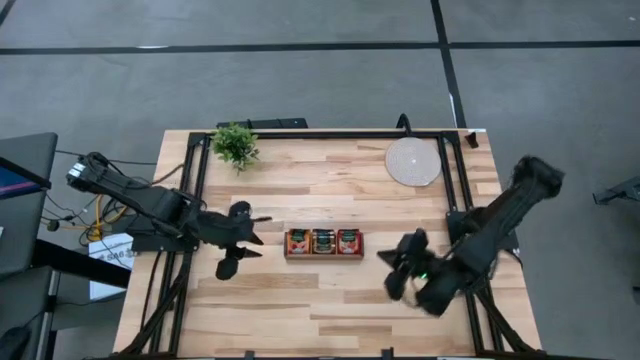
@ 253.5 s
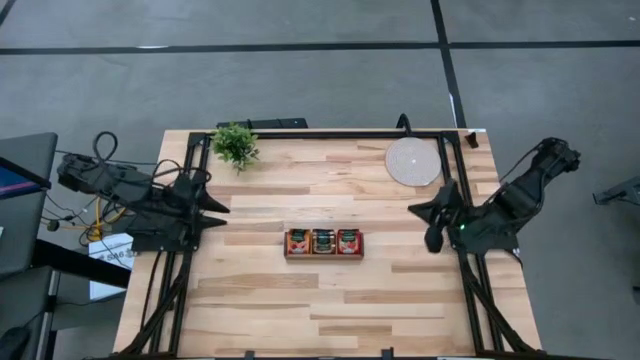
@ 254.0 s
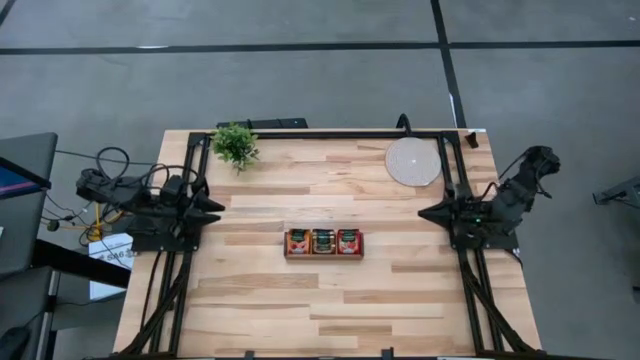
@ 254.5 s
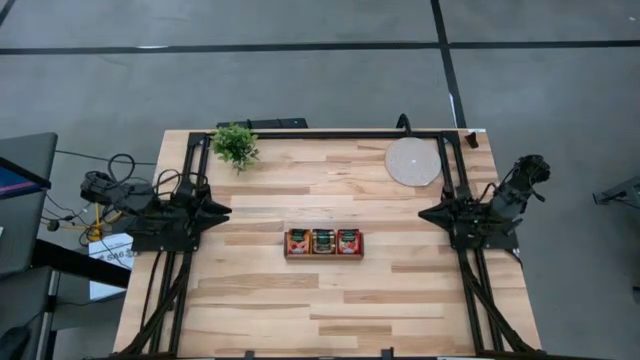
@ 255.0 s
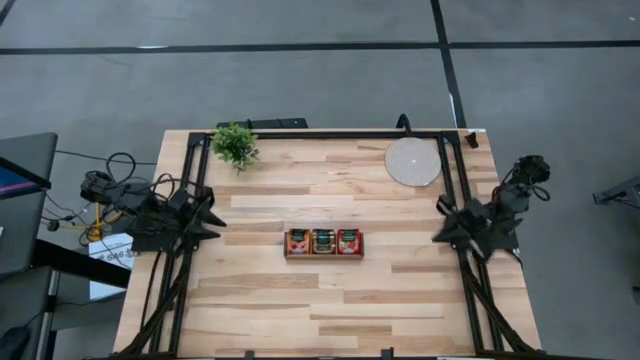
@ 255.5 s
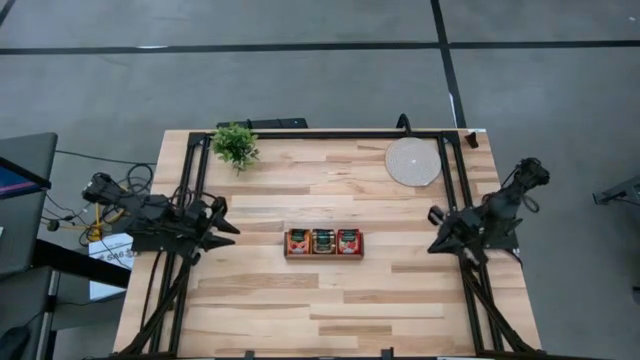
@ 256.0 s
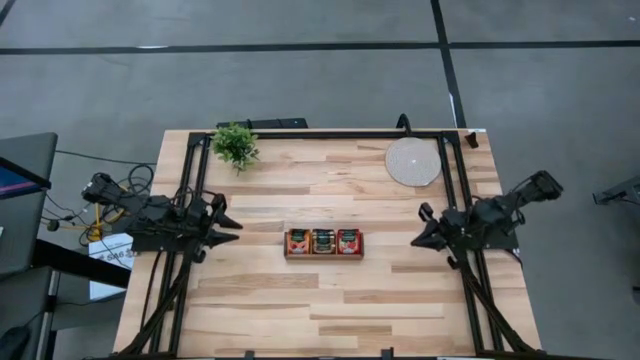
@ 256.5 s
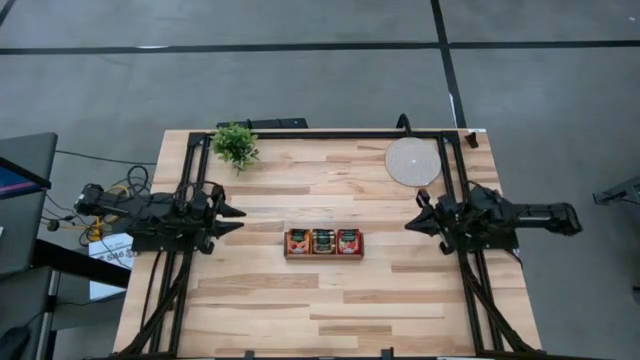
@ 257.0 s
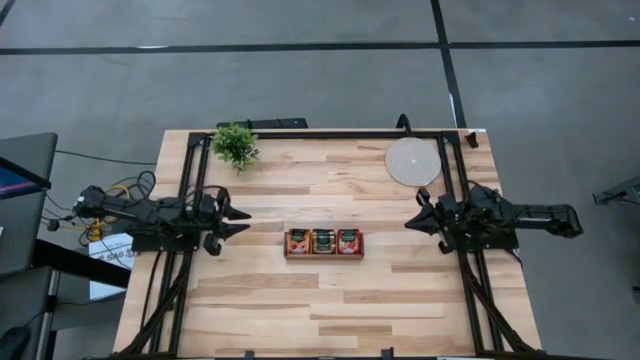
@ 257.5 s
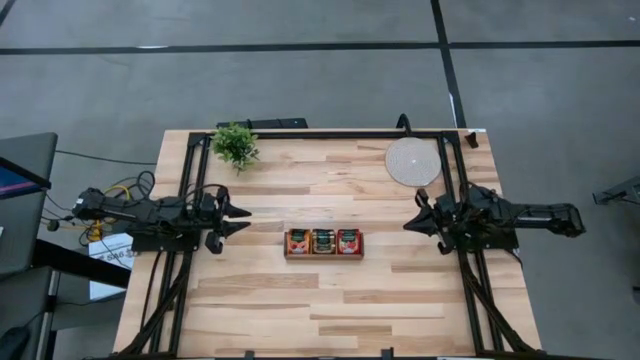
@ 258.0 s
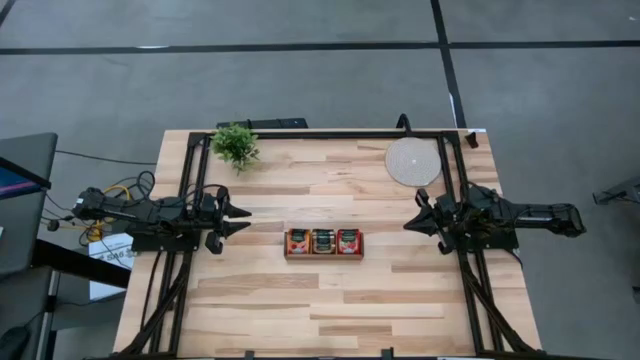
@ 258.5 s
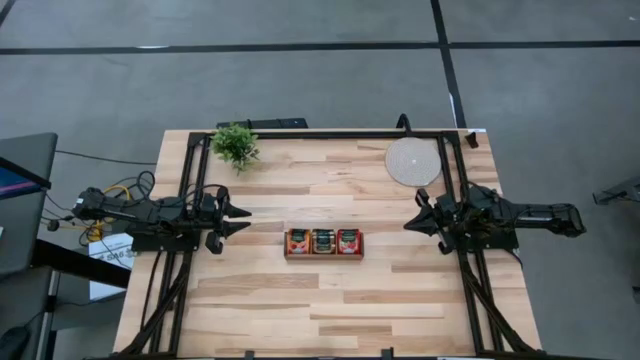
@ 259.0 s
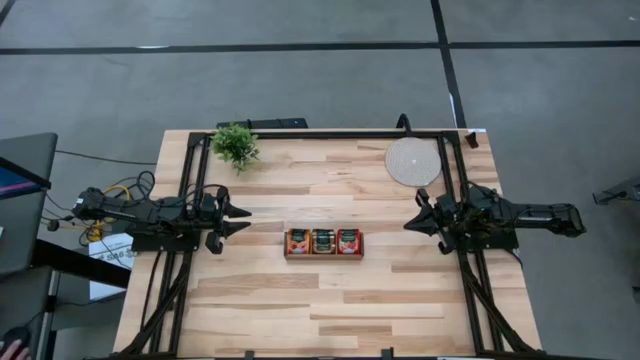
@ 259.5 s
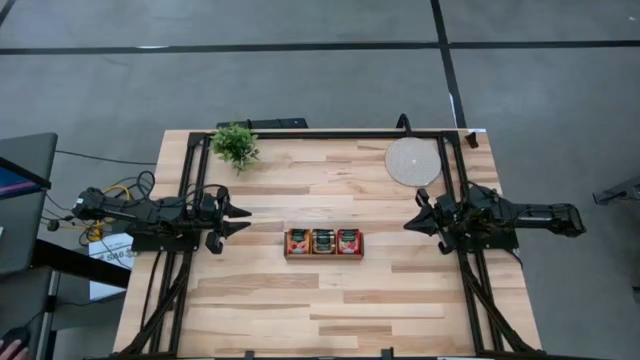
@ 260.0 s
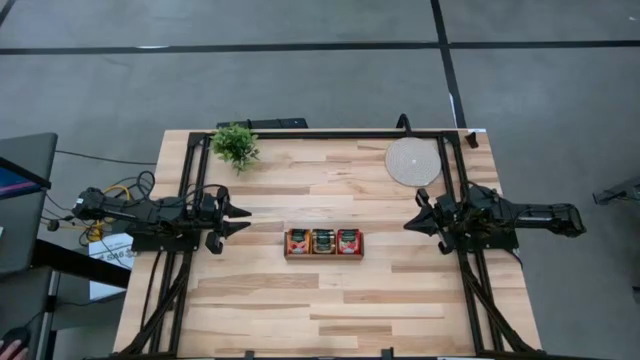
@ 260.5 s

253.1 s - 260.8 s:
Task: Pick & Place Tea
Return to Home Position

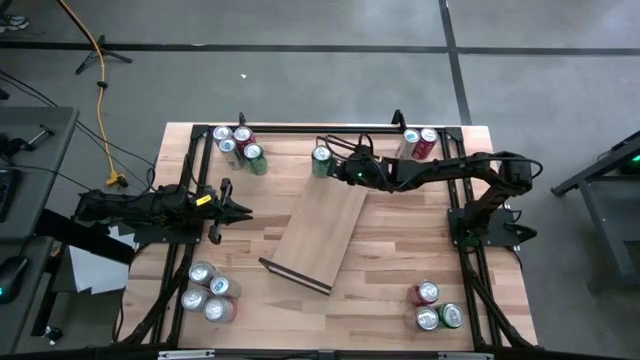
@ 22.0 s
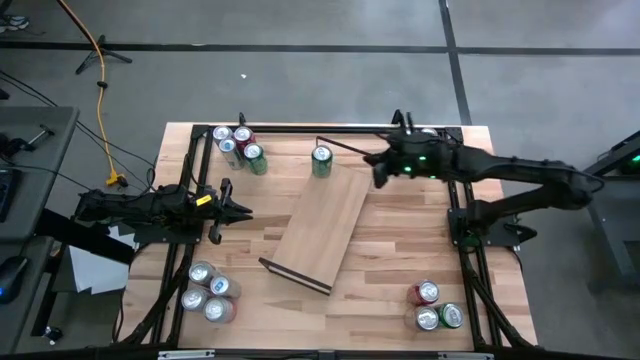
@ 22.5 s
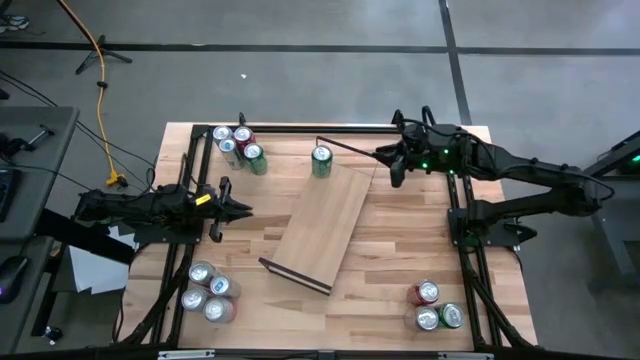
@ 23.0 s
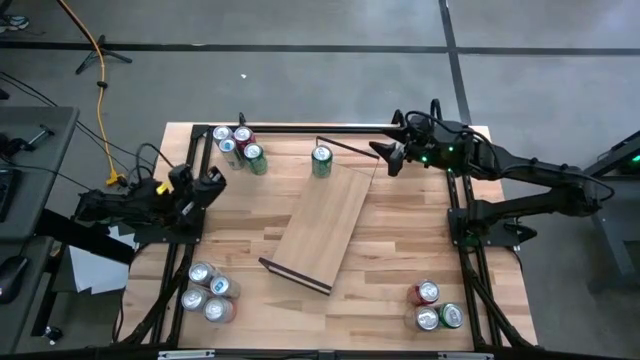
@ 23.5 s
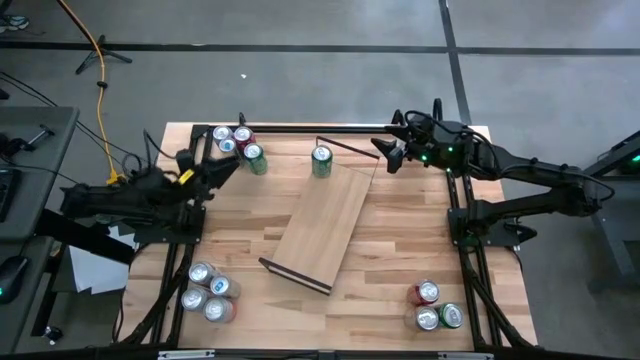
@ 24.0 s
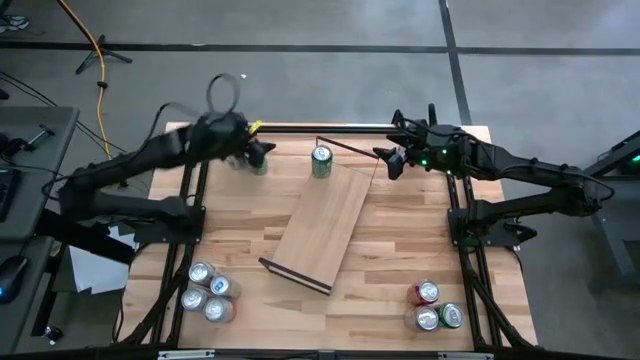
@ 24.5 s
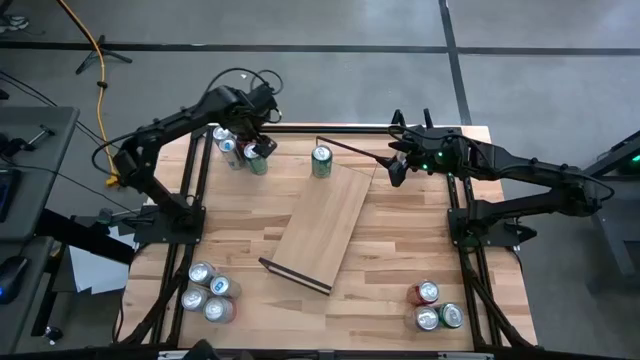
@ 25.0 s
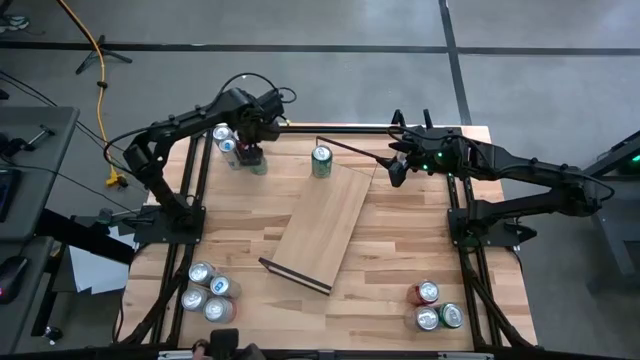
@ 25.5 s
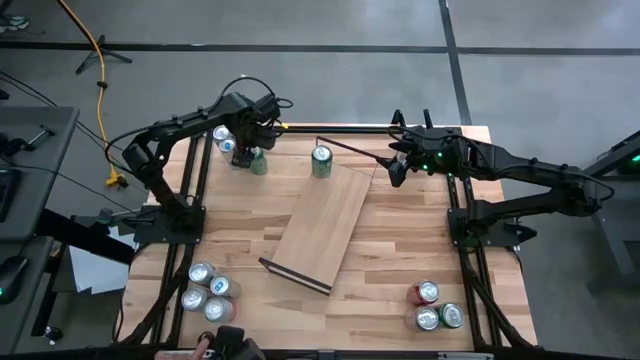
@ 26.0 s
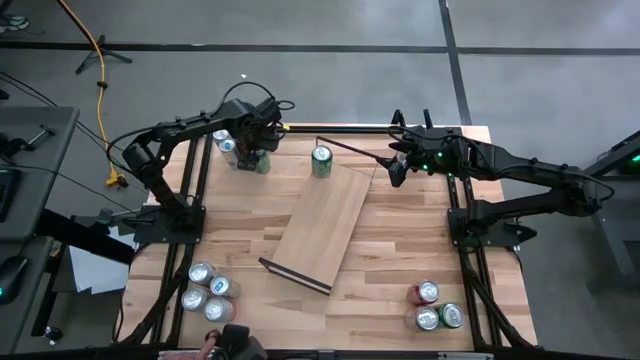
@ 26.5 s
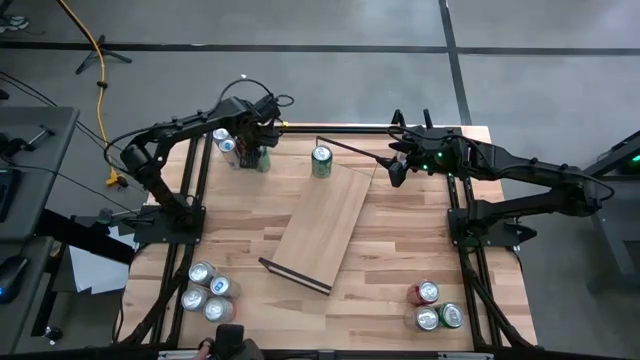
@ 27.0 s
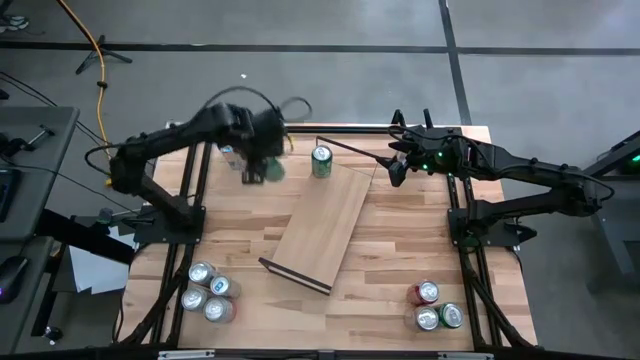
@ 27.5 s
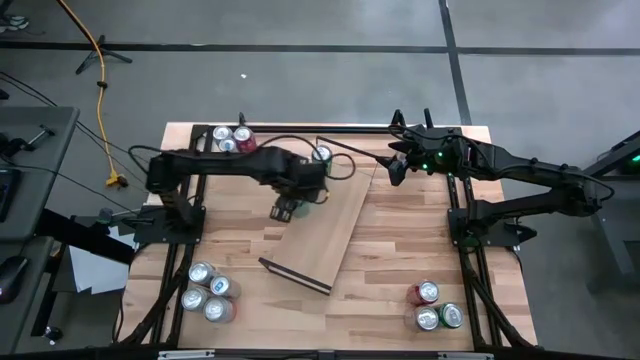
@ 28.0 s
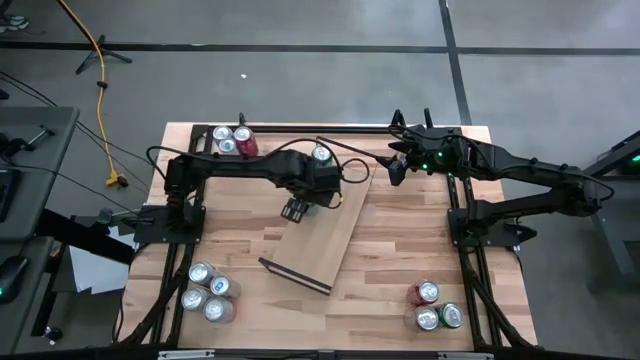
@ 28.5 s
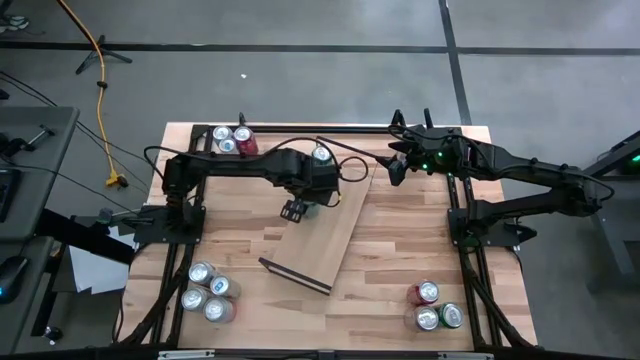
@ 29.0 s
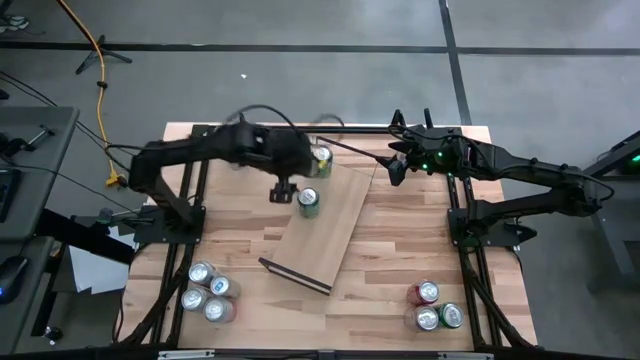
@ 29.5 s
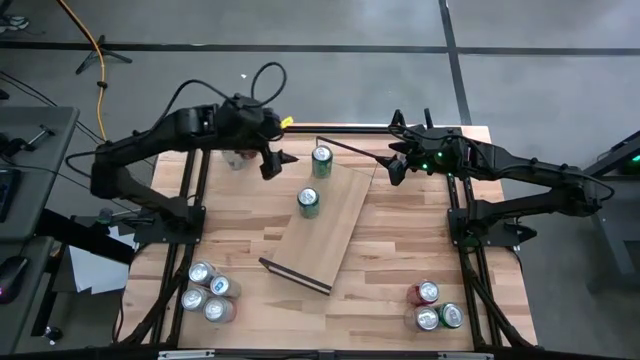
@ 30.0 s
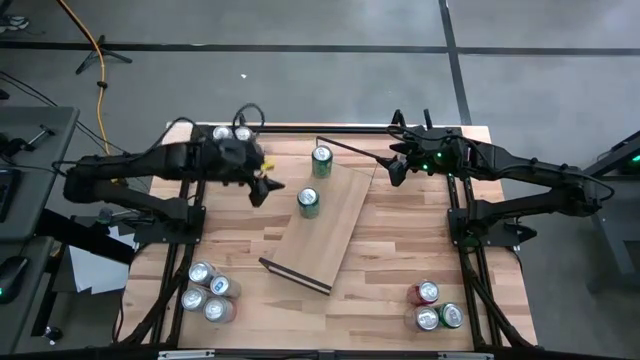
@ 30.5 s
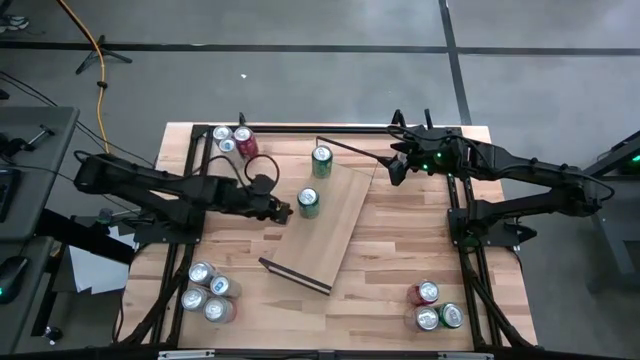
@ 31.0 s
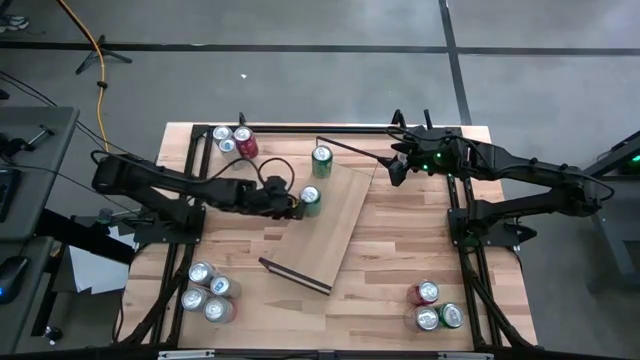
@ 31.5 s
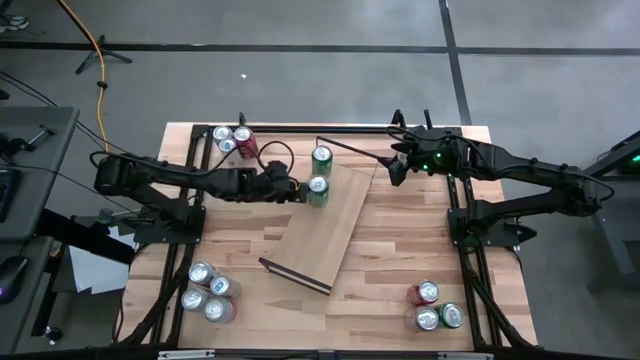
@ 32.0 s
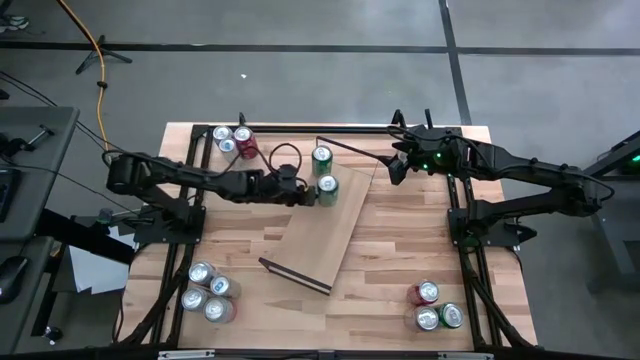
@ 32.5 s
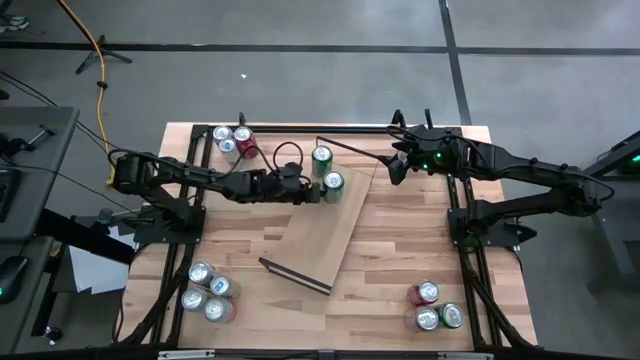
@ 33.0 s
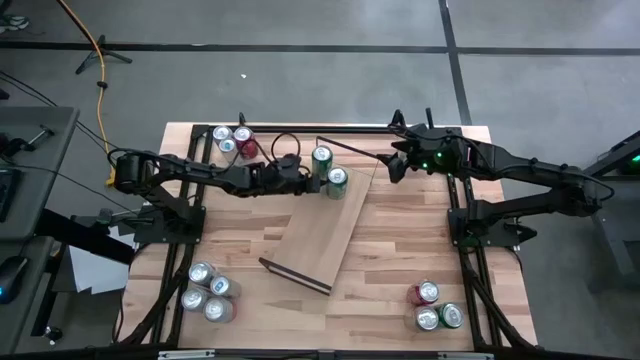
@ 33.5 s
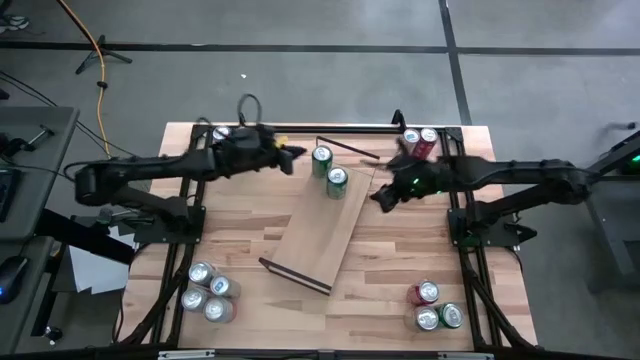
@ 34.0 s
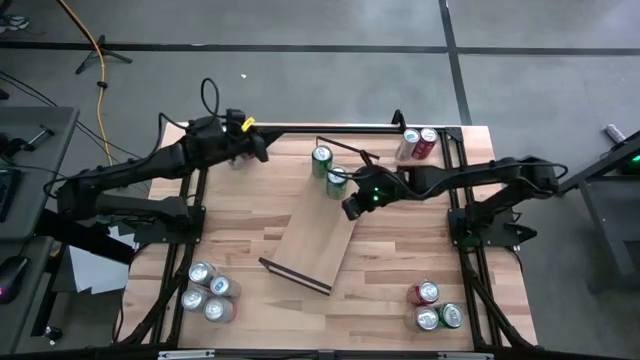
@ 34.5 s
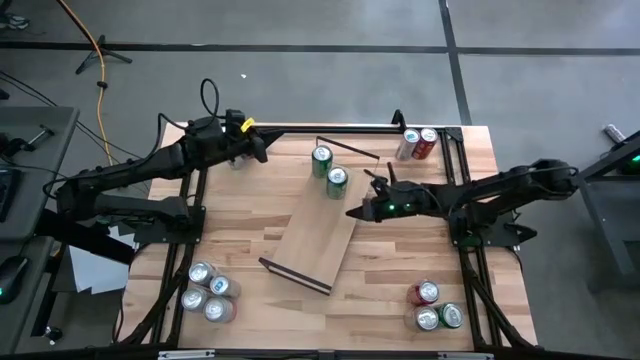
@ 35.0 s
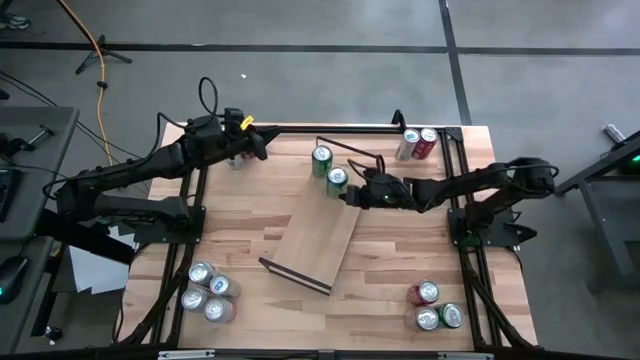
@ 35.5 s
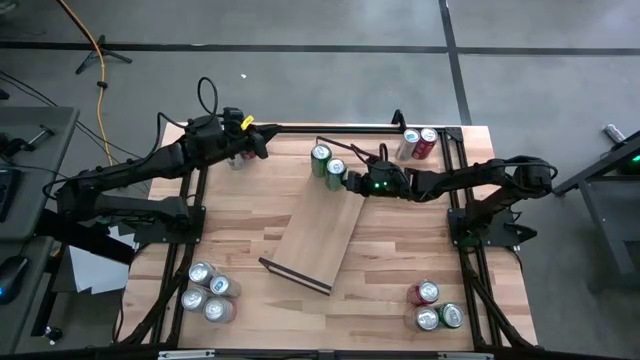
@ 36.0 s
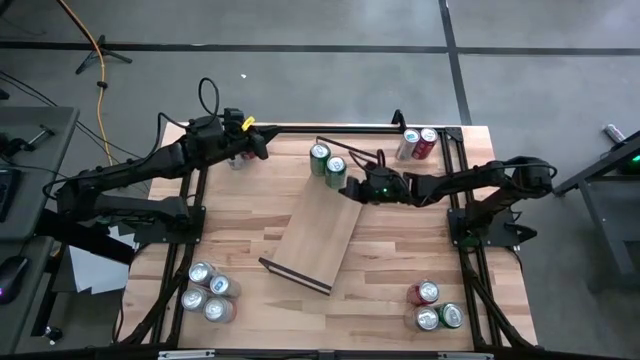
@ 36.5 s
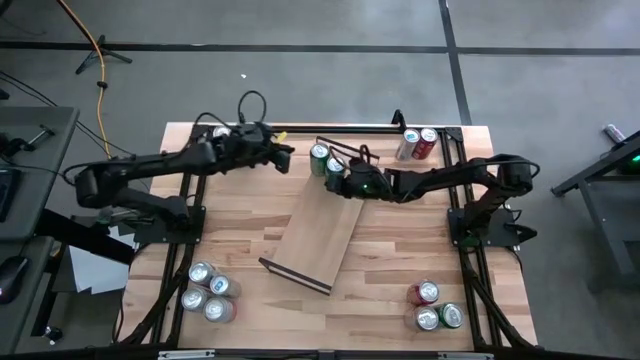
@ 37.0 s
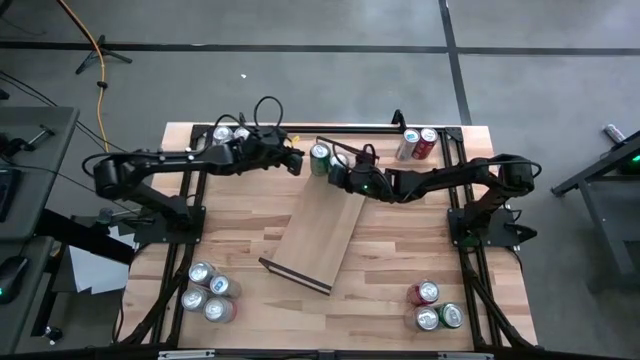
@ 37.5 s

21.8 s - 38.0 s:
Task: Place canned beverage on shelf
Put the top green soda can on the shelf aligned with the other green soda can
